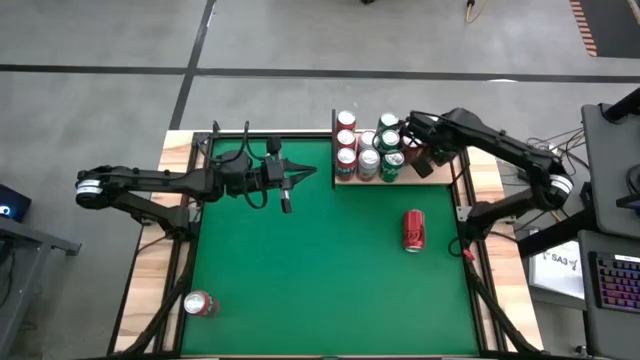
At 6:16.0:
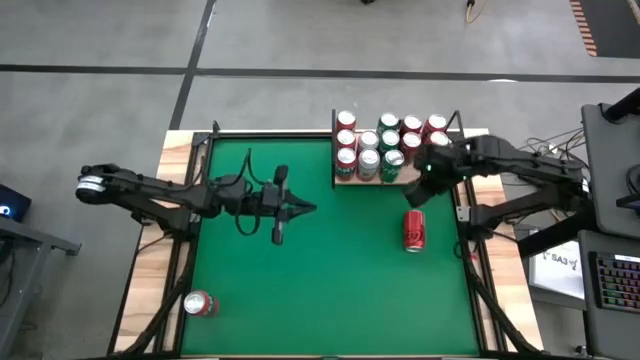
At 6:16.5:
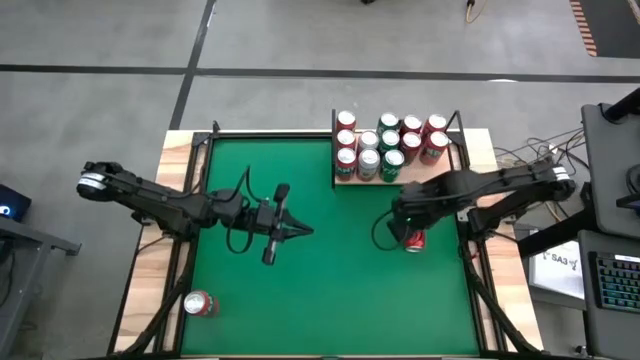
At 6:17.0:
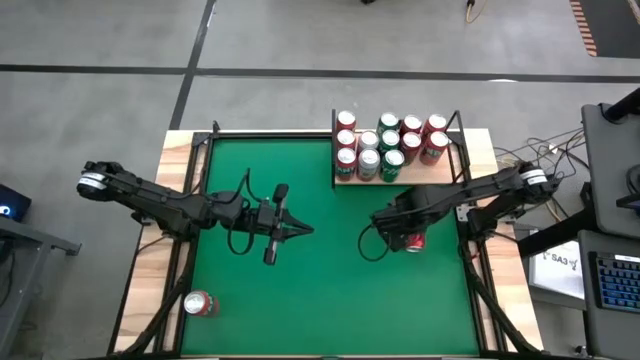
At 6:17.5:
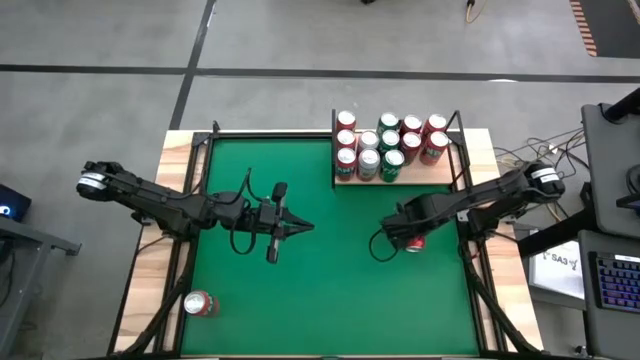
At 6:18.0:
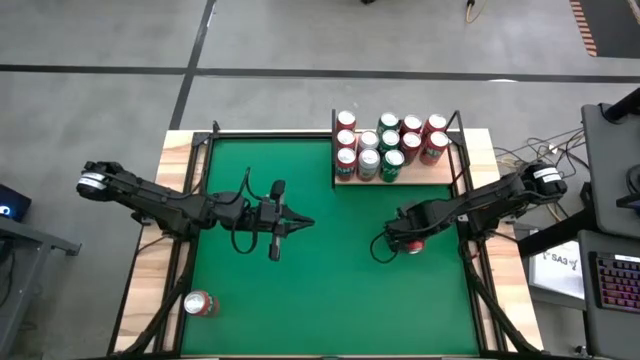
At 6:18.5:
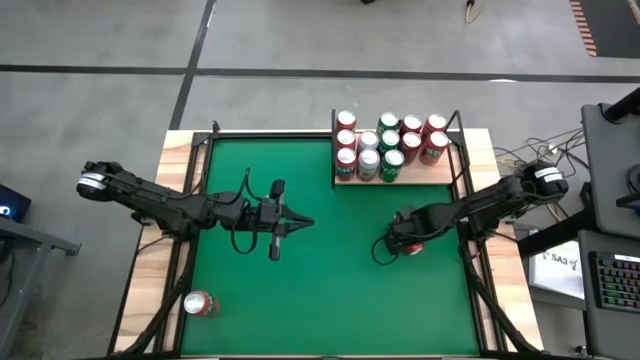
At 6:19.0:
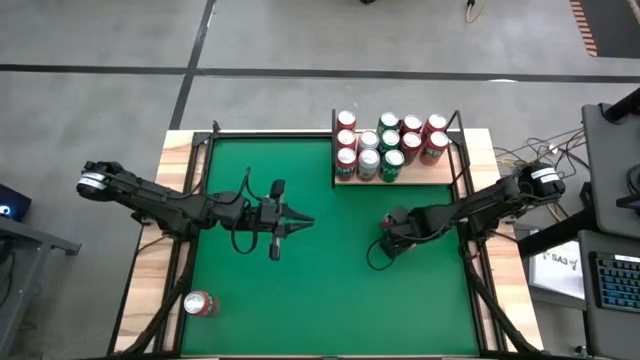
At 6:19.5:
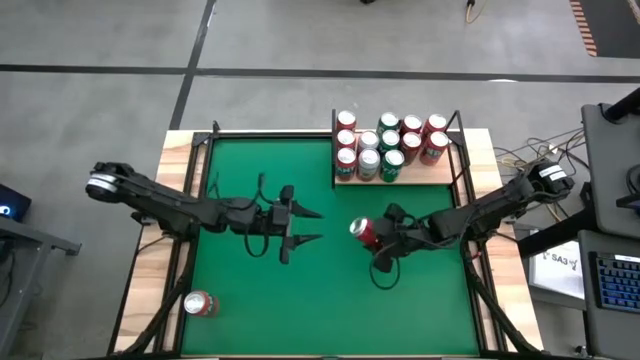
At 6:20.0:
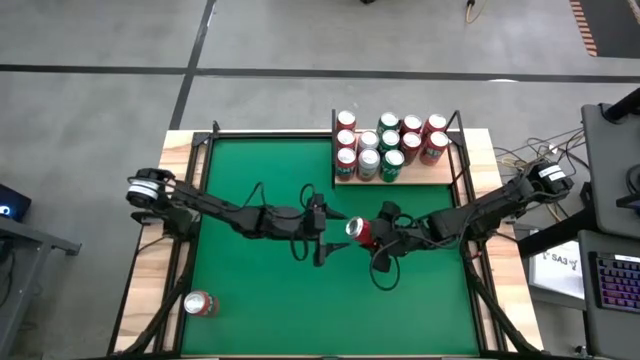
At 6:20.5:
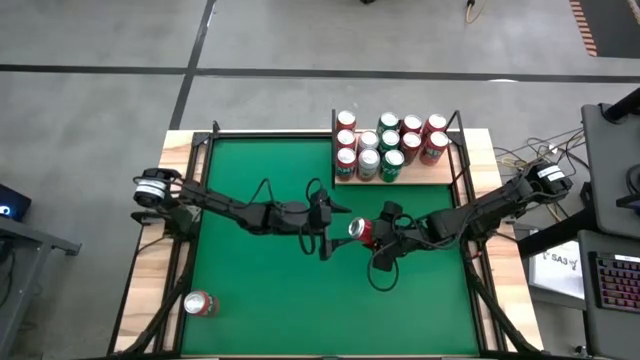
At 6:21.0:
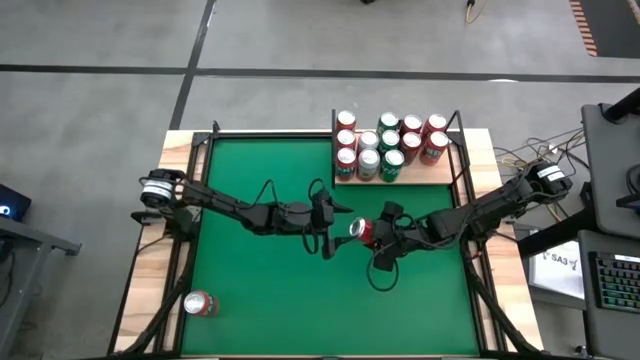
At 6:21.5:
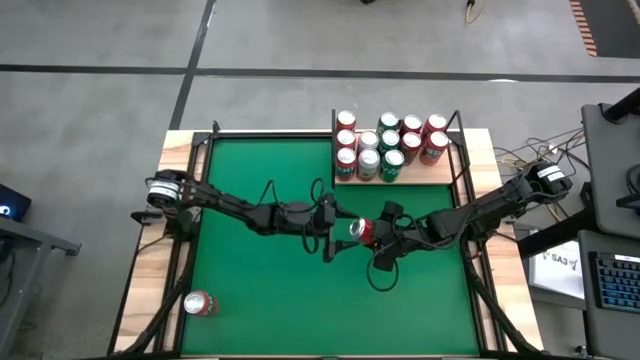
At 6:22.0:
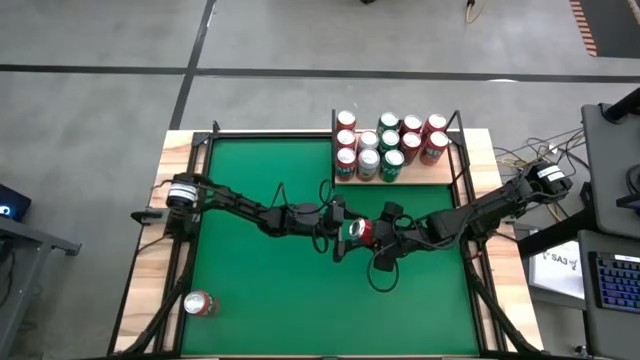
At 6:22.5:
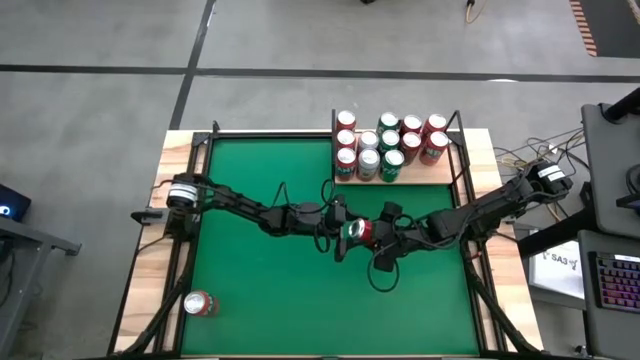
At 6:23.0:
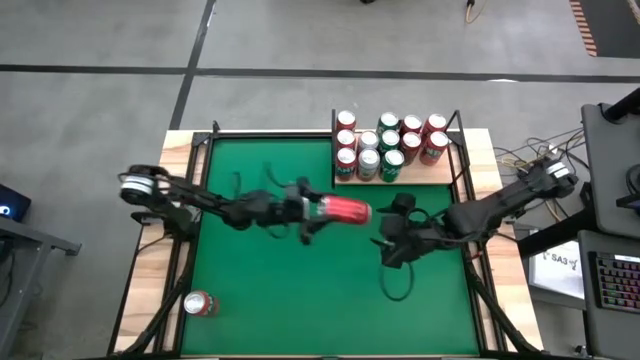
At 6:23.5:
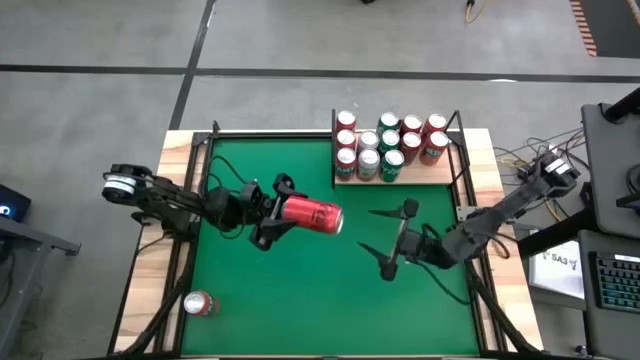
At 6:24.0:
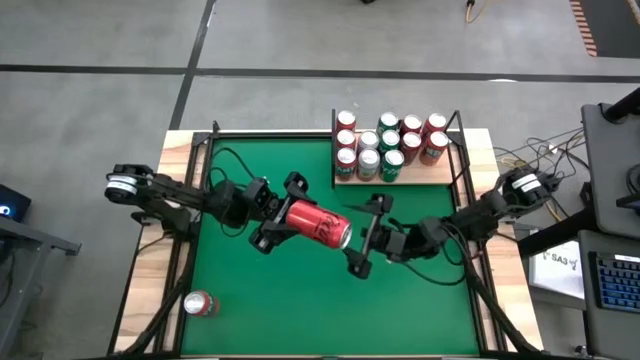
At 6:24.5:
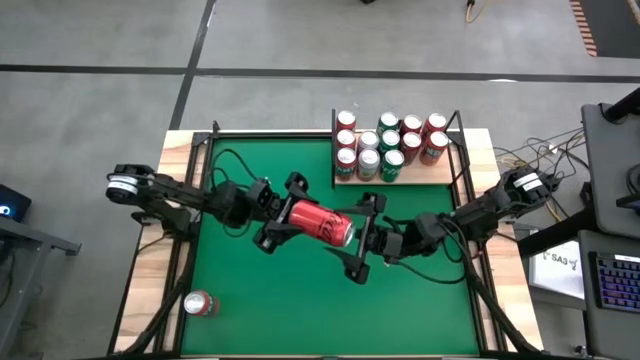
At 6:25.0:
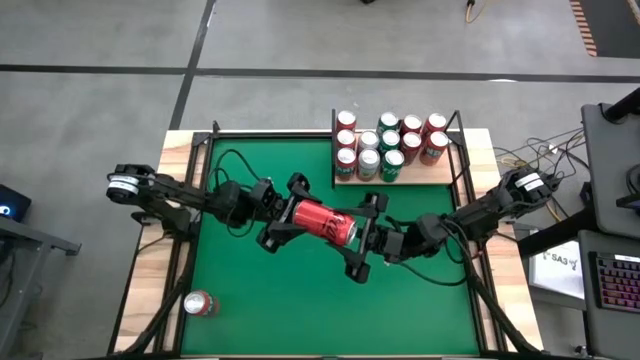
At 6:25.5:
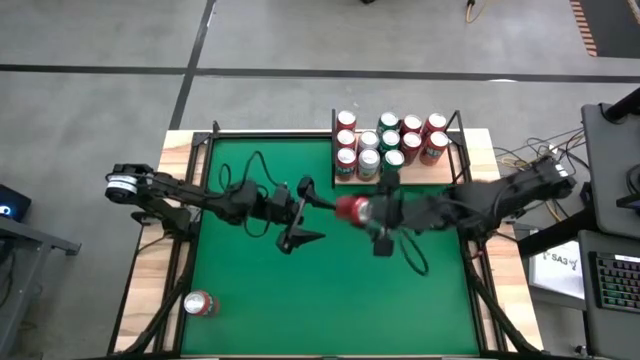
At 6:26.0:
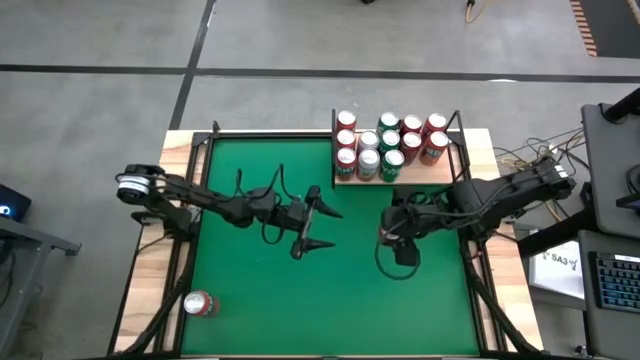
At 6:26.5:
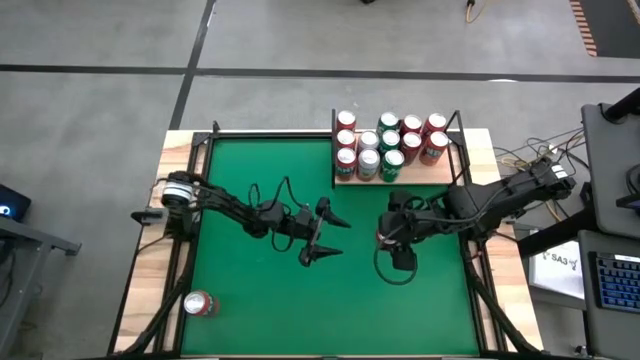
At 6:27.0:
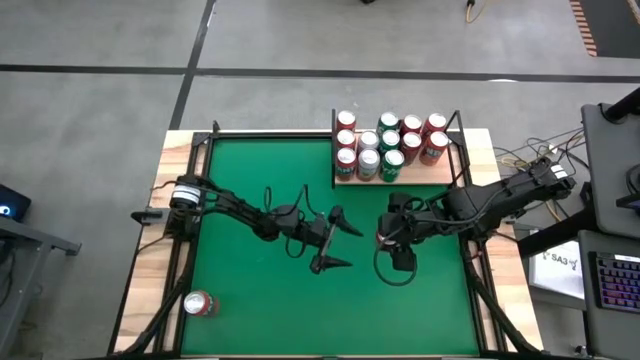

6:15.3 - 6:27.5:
Task: Place canned beverage on shelf
Put the red/black soda can on the shelf aligned with the other red/black soda cans

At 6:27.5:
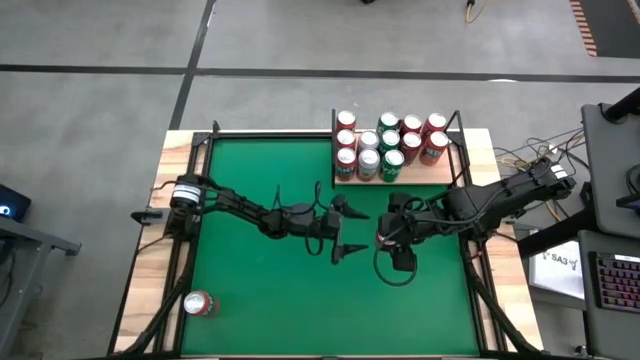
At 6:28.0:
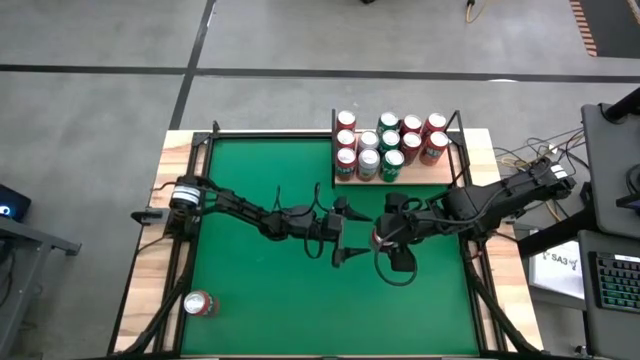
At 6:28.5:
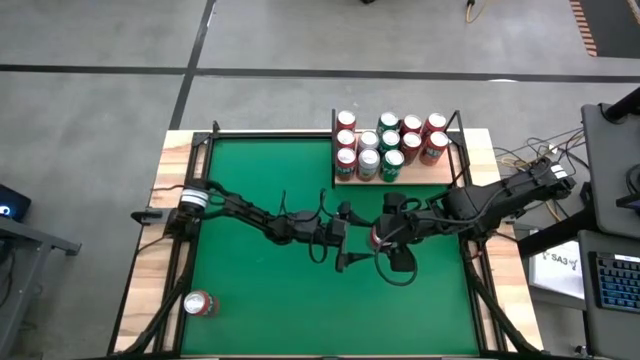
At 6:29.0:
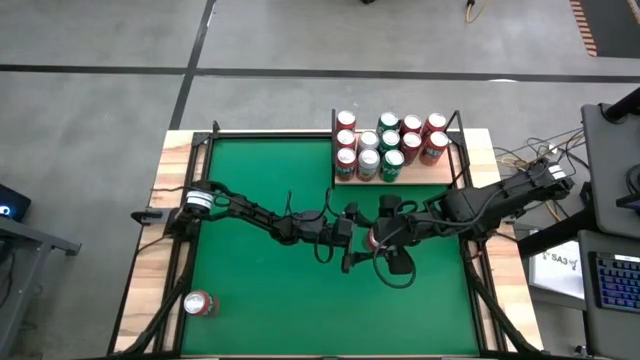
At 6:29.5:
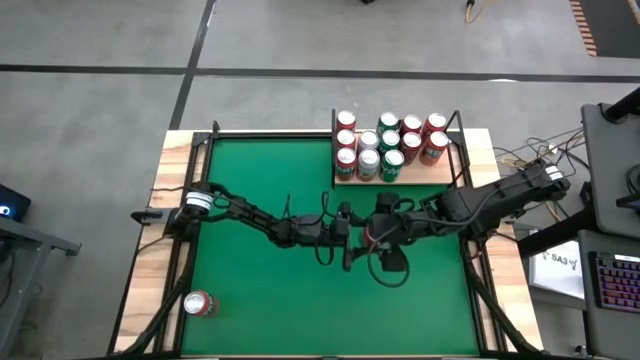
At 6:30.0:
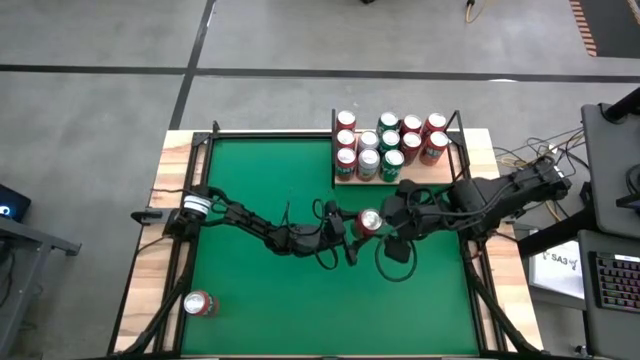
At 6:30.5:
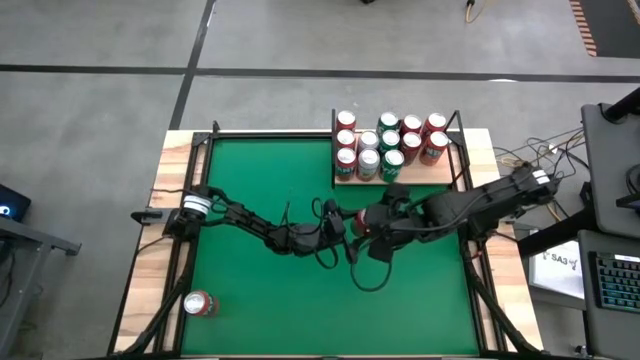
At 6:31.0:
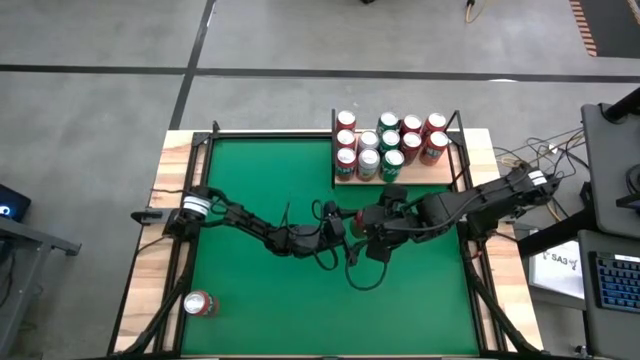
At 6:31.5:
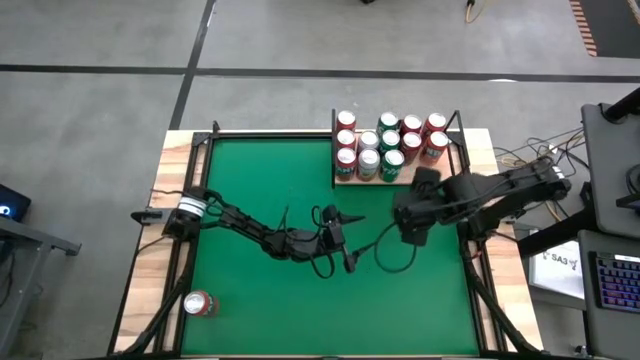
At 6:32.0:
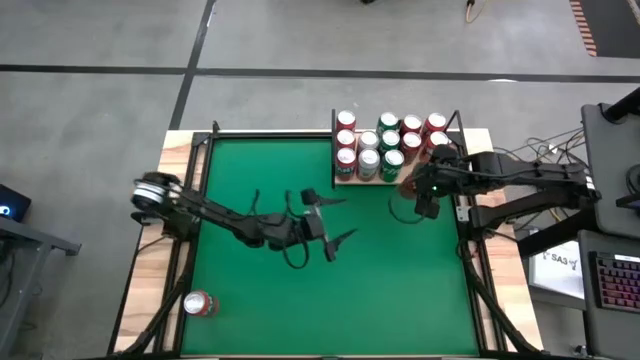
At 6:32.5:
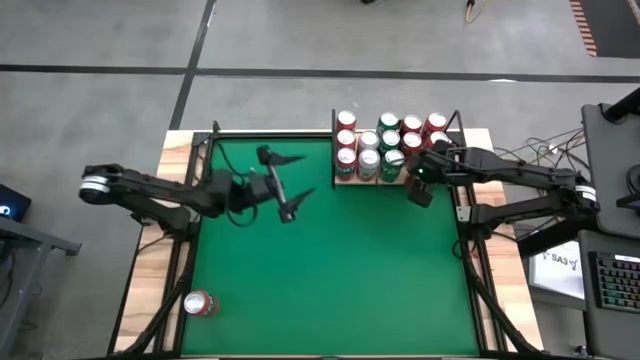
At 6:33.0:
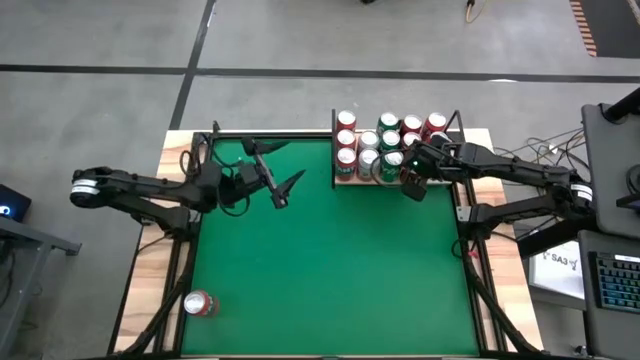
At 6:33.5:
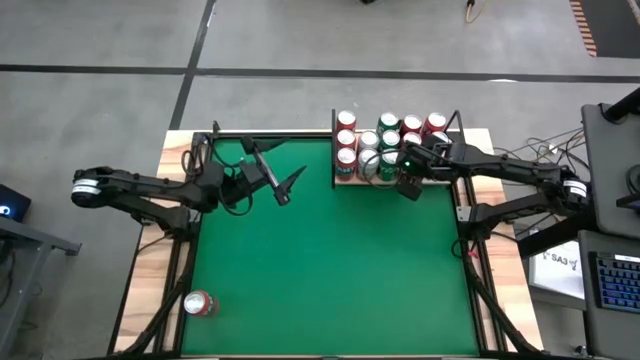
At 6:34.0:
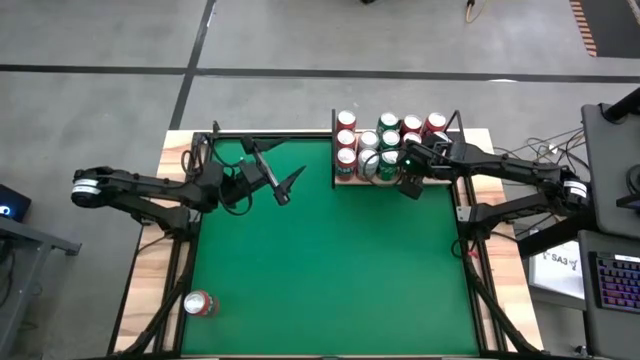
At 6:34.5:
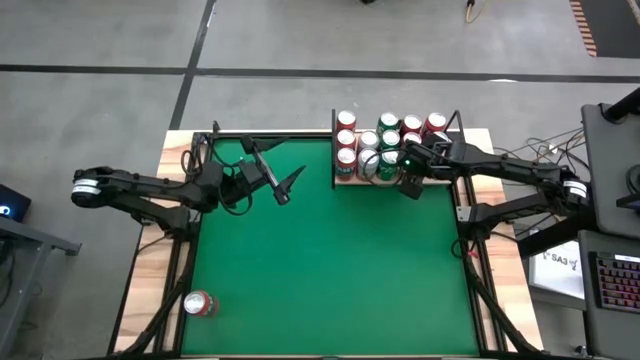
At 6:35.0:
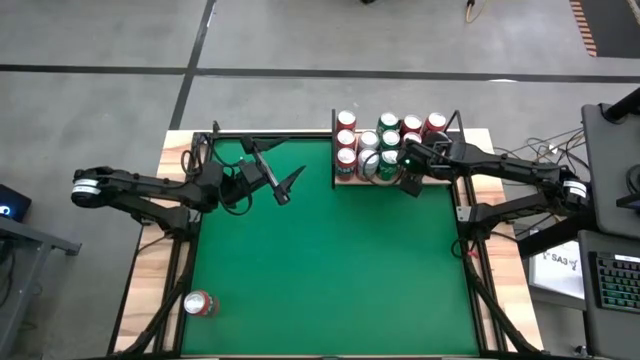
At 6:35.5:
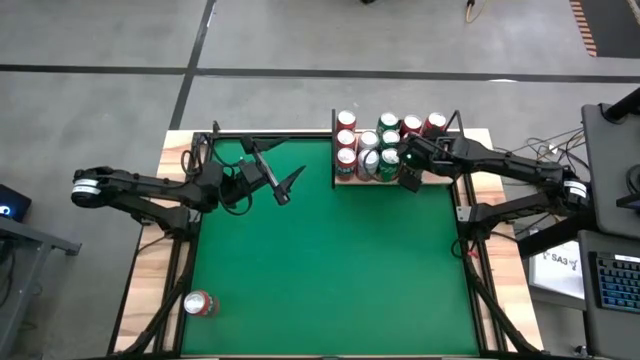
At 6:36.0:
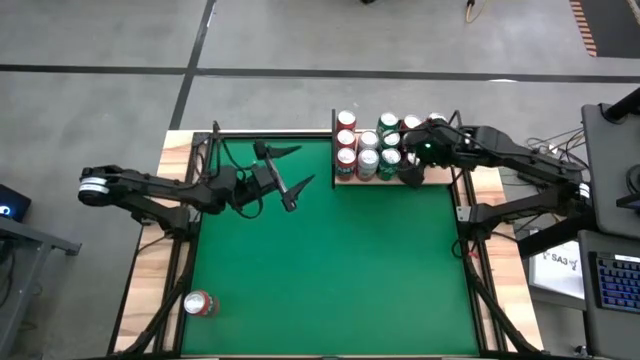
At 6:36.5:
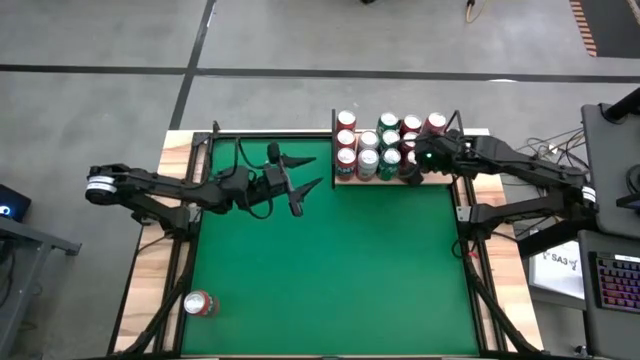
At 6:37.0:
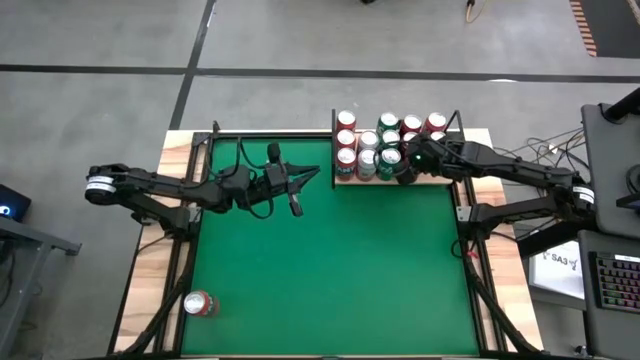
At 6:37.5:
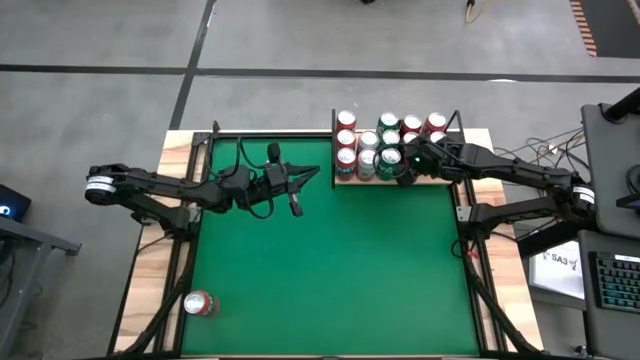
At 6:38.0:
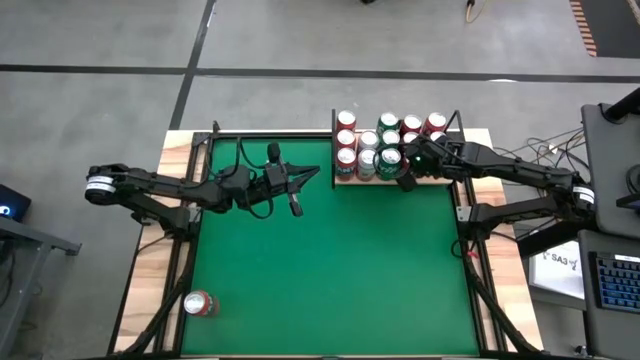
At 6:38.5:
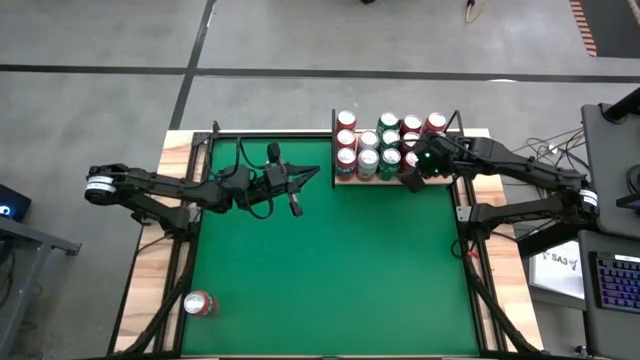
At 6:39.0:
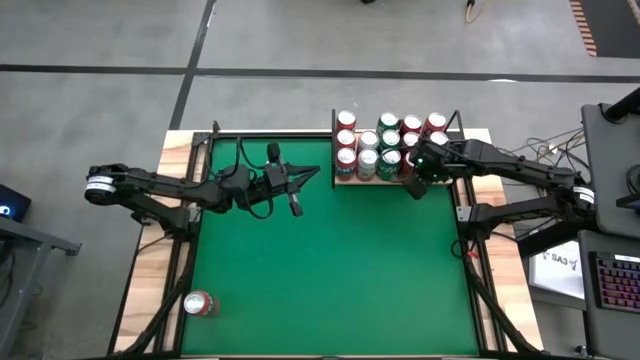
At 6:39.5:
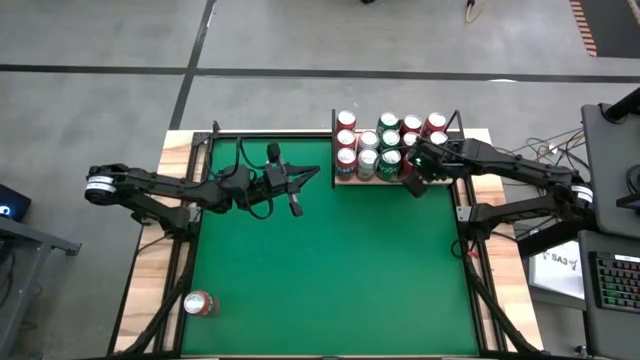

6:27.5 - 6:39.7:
Put the red/black soda can on the shelf aligned with the other red/black soda cans
